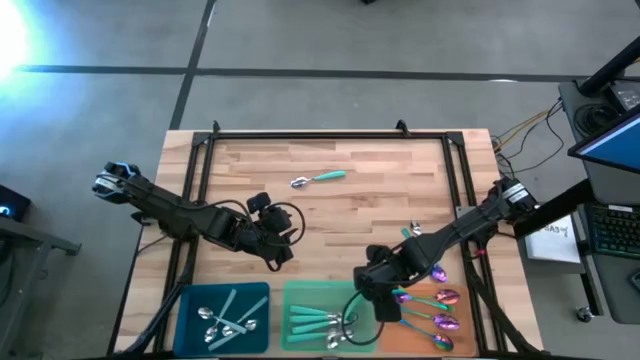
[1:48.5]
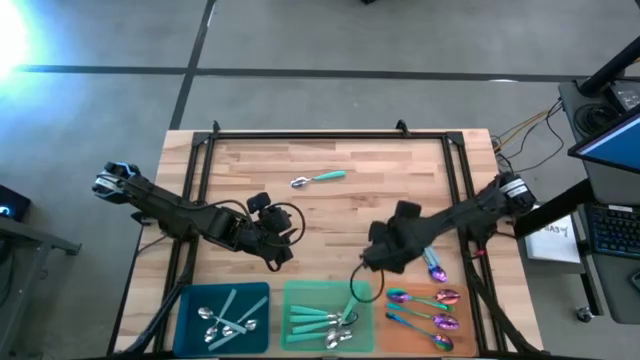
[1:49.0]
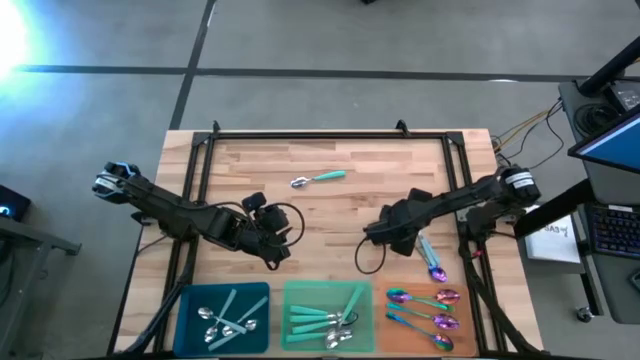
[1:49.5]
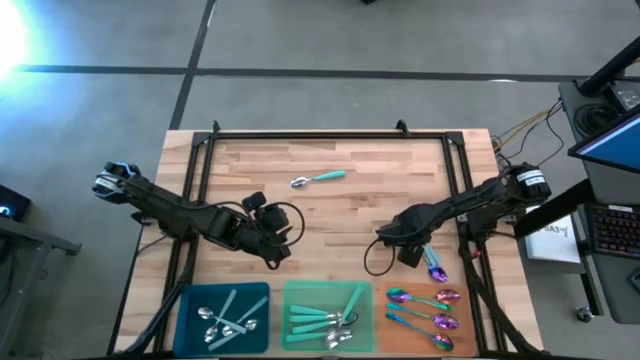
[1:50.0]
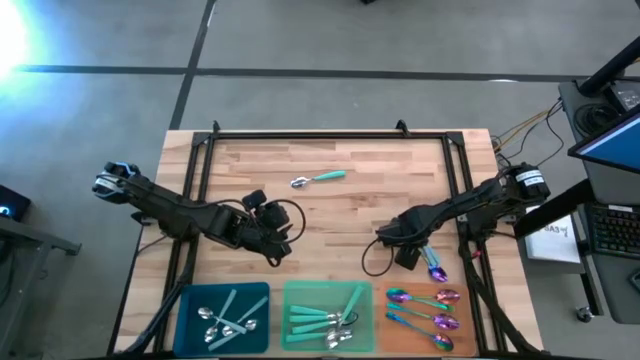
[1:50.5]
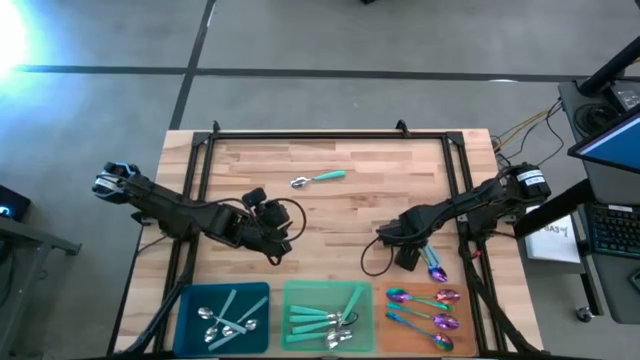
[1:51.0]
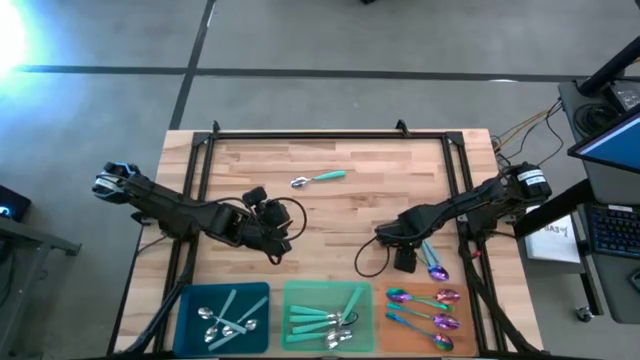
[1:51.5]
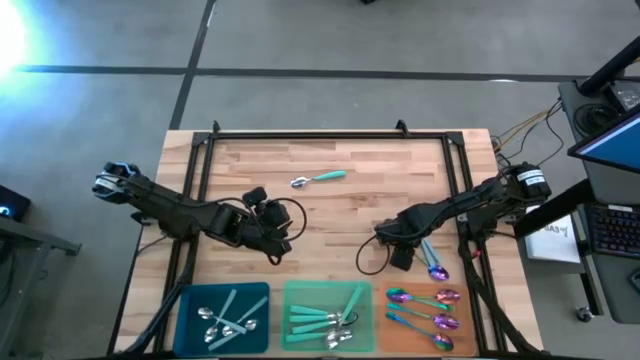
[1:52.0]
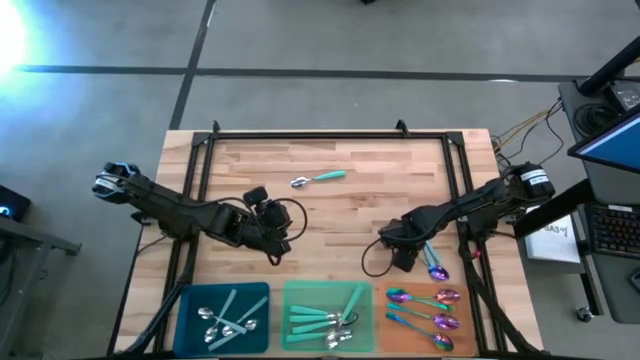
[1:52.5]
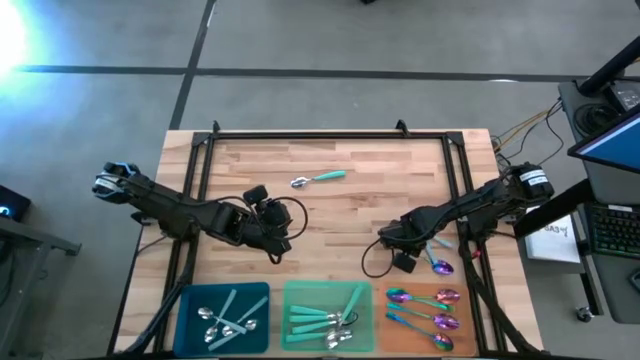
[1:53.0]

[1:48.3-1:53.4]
Task: Sort silverware by color (type)
Put the blue spoon into the orange bin

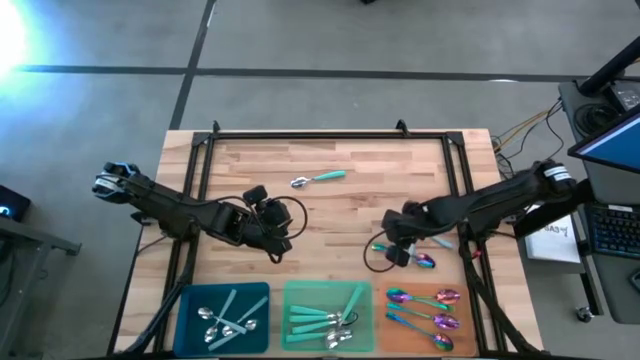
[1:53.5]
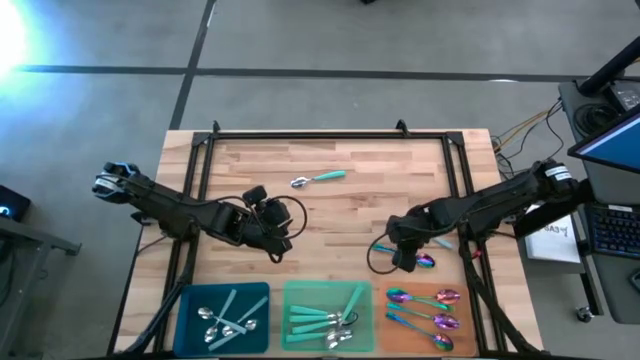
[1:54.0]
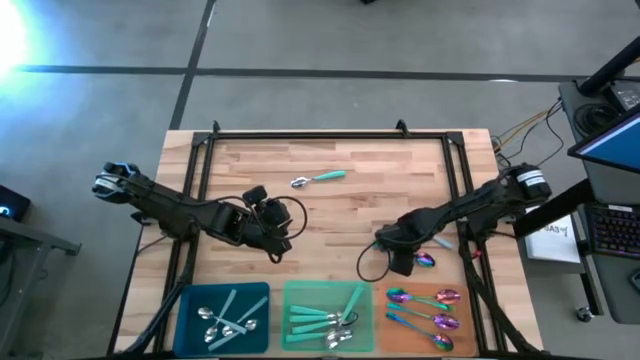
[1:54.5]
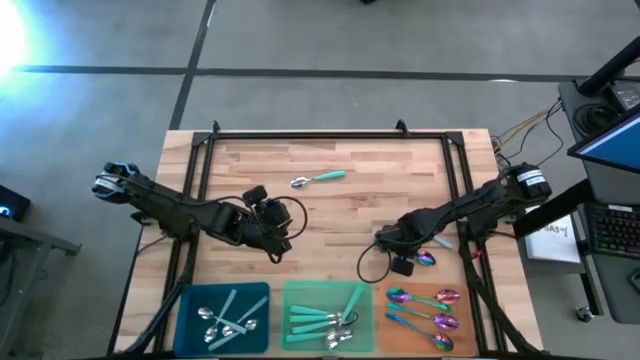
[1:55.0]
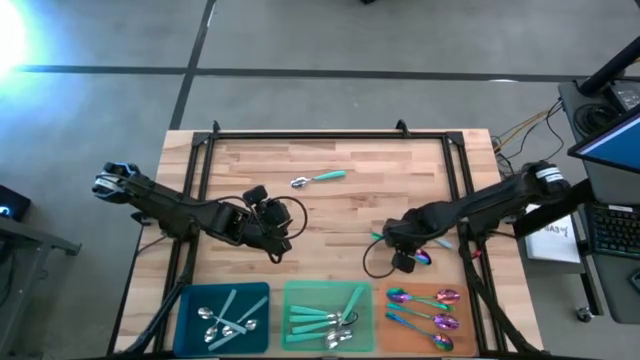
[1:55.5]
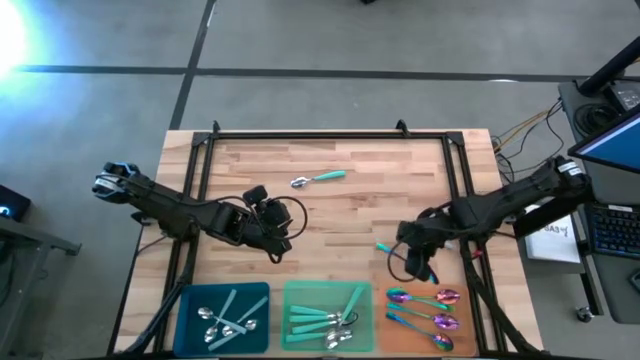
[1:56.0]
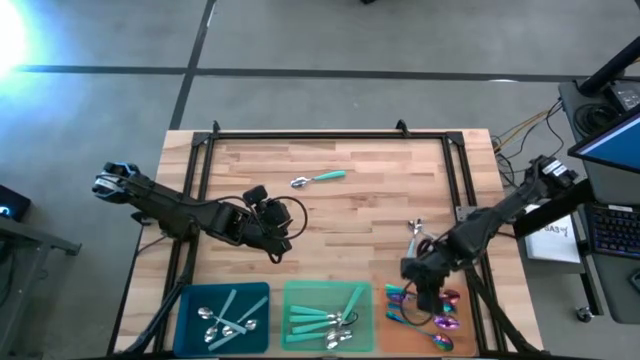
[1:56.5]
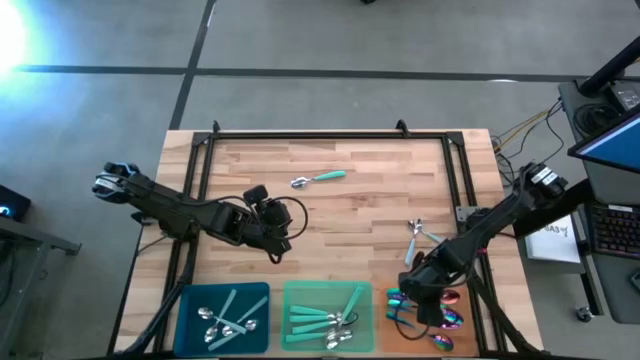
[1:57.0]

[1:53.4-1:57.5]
Put the blue spoon into the orange bin

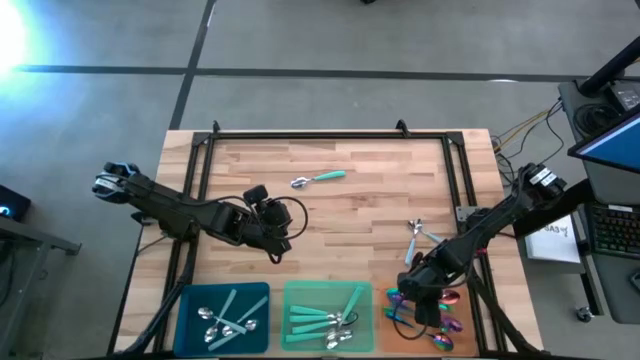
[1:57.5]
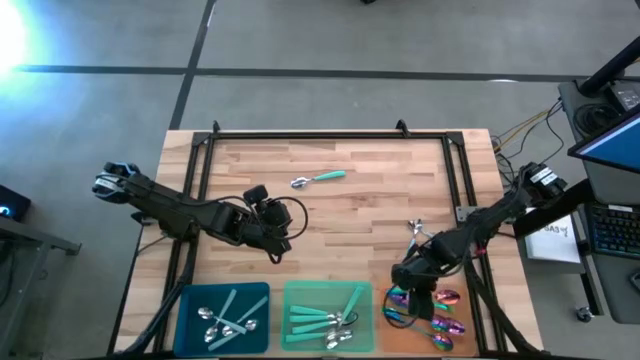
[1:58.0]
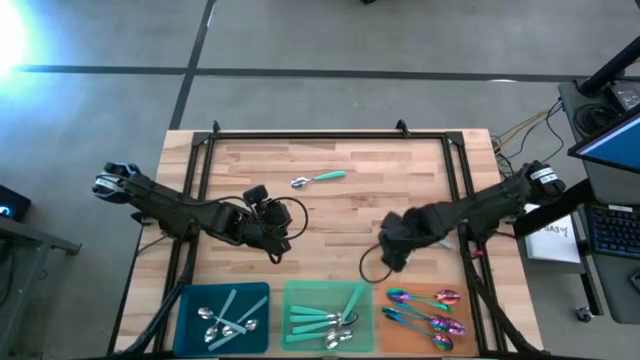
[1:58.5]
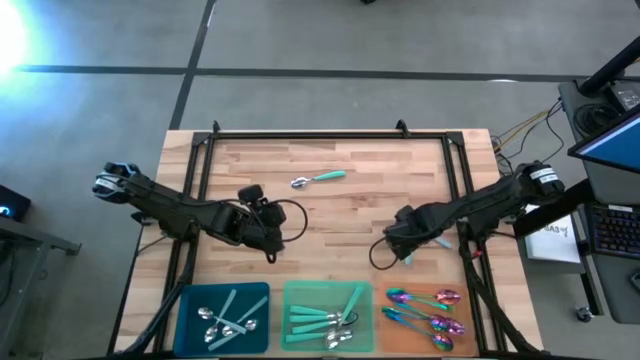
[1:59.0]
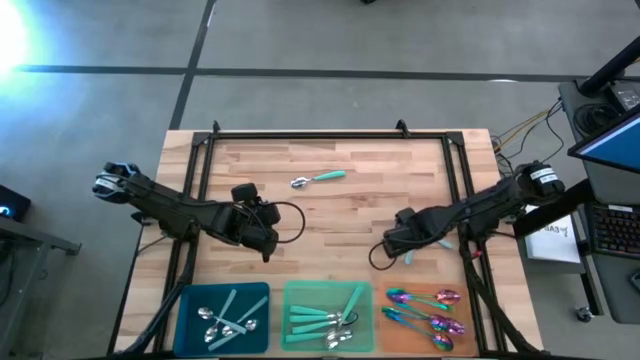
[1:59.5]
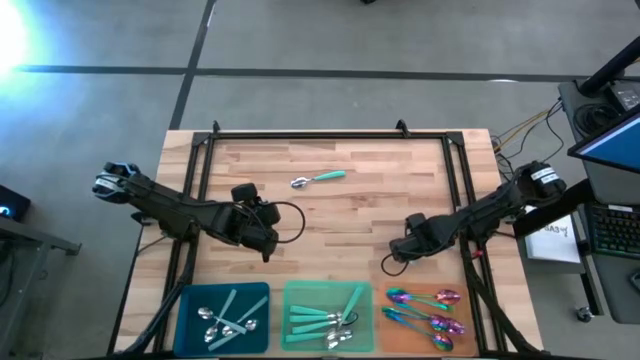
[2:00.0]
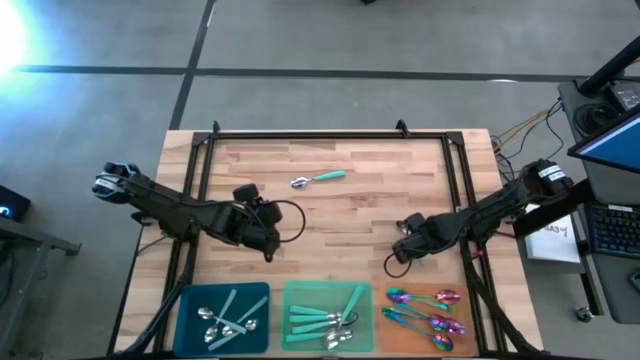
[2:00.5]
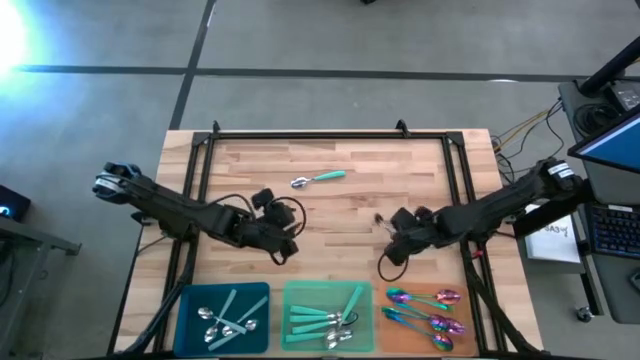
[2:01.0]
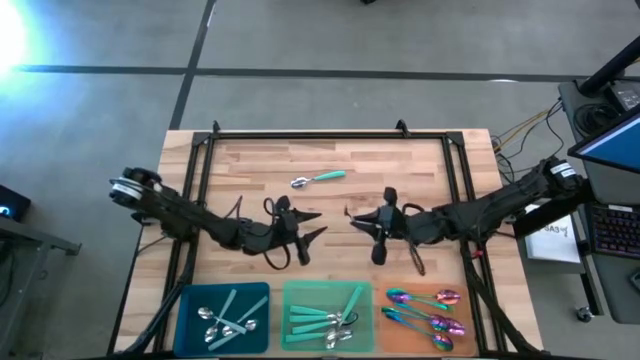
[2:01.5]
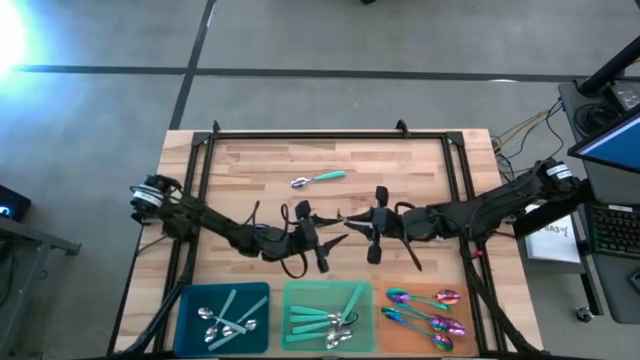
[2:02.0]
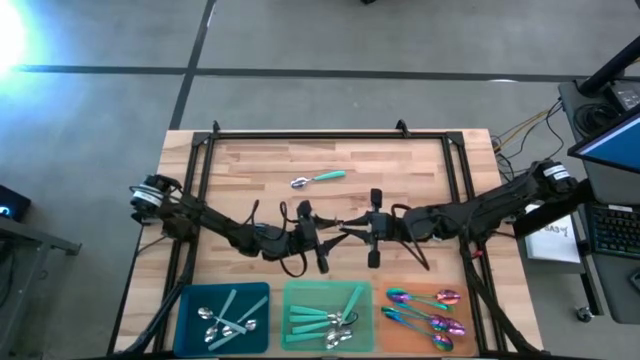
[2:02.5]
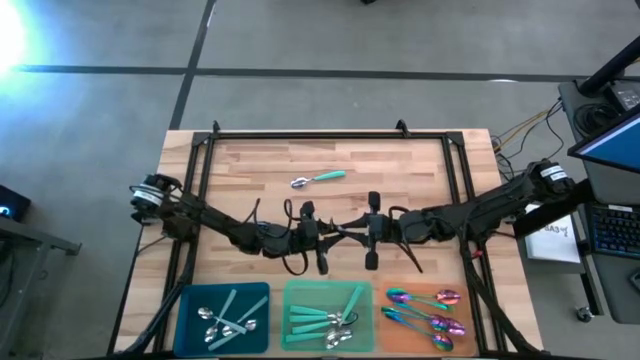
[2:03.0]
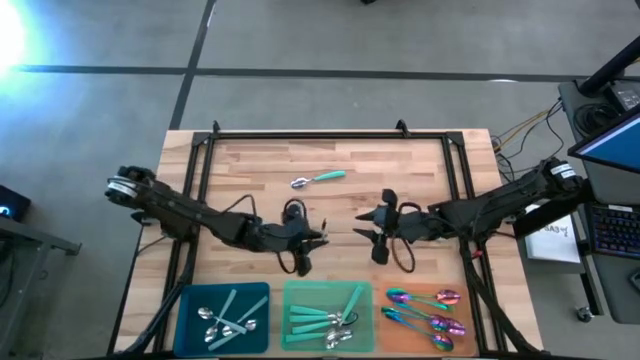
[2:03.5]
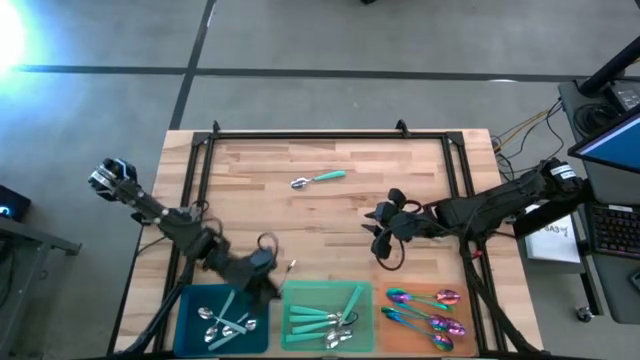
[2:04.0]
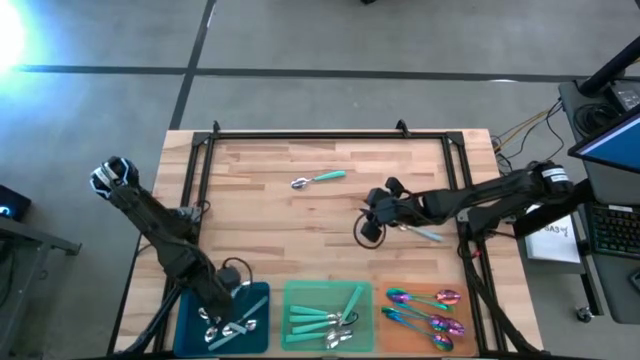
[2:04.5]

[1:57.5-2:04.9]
Put the light blue spoon into the blue bin
